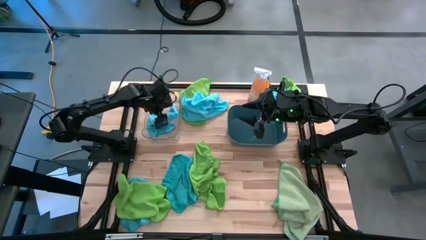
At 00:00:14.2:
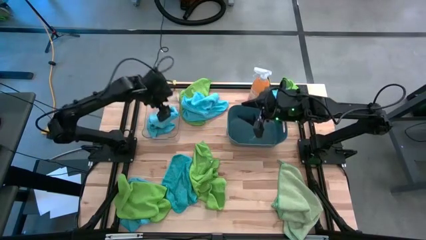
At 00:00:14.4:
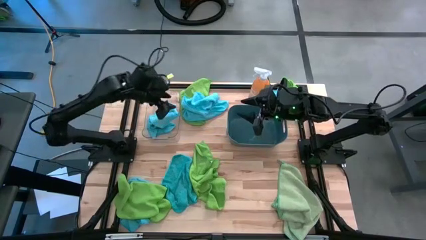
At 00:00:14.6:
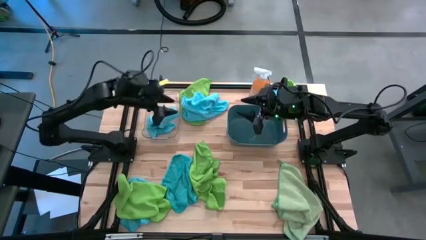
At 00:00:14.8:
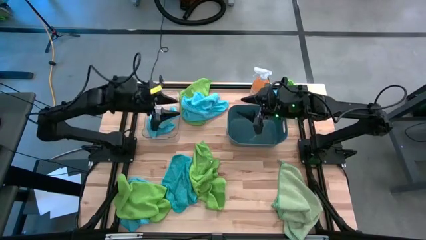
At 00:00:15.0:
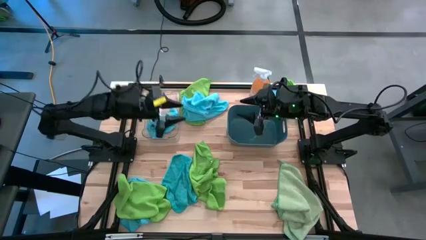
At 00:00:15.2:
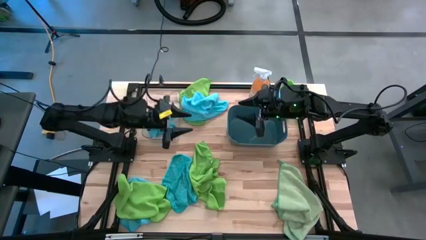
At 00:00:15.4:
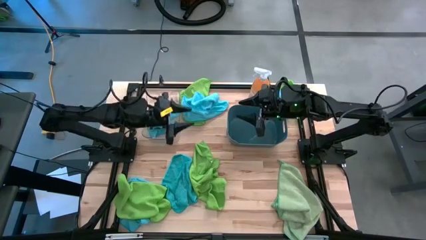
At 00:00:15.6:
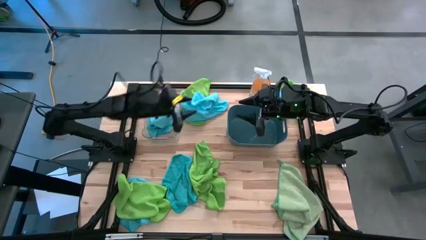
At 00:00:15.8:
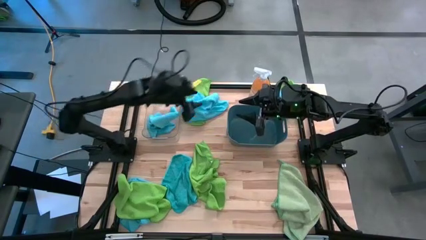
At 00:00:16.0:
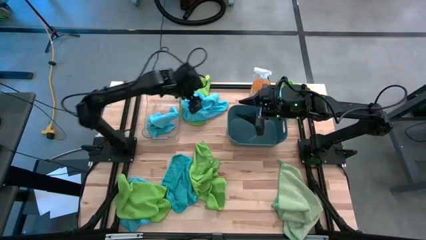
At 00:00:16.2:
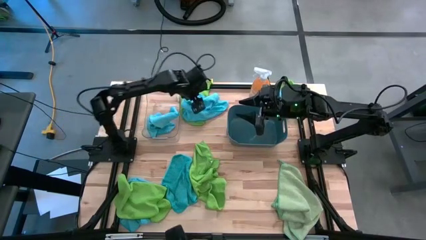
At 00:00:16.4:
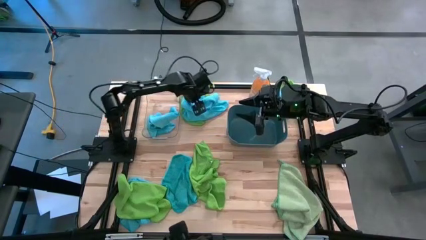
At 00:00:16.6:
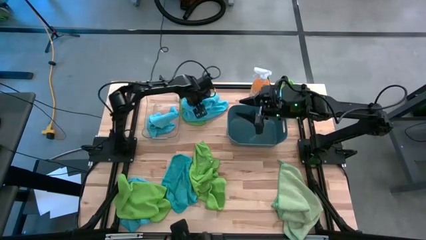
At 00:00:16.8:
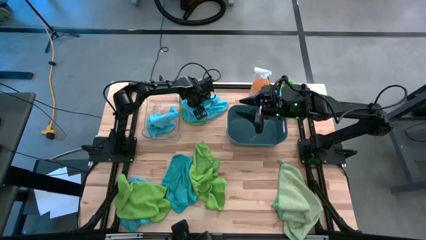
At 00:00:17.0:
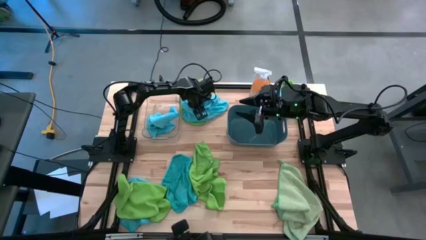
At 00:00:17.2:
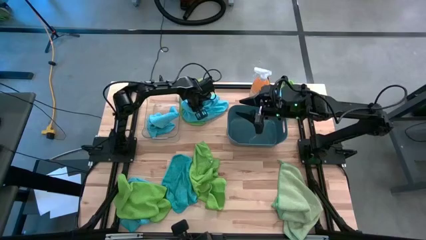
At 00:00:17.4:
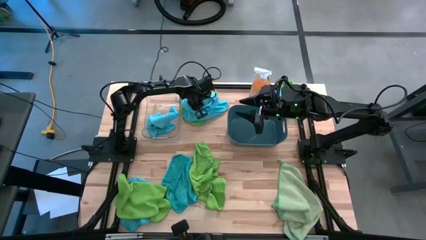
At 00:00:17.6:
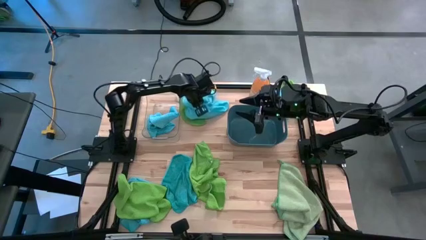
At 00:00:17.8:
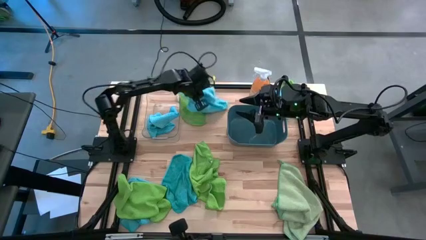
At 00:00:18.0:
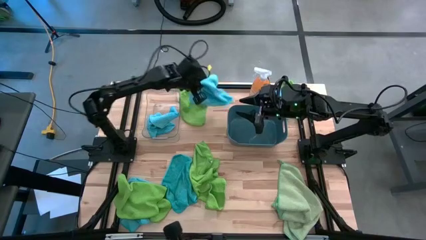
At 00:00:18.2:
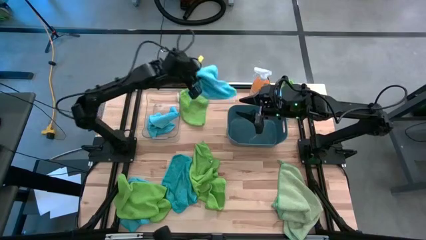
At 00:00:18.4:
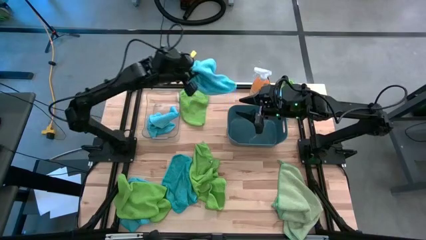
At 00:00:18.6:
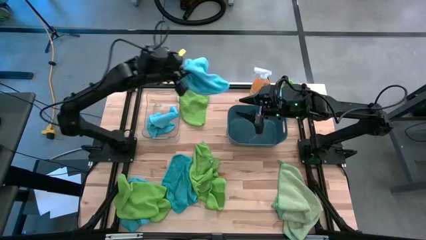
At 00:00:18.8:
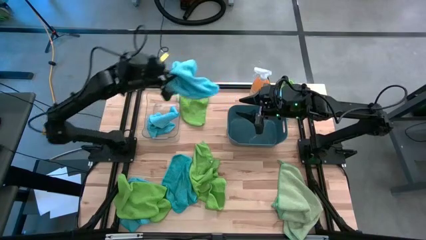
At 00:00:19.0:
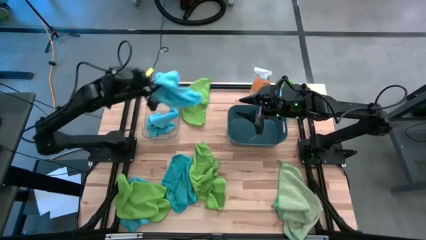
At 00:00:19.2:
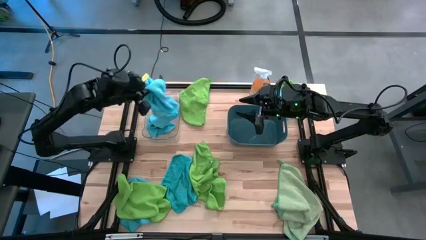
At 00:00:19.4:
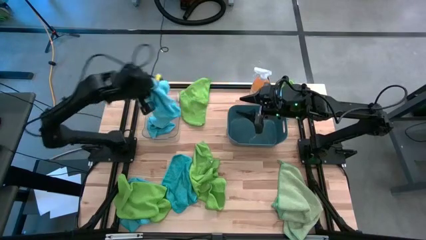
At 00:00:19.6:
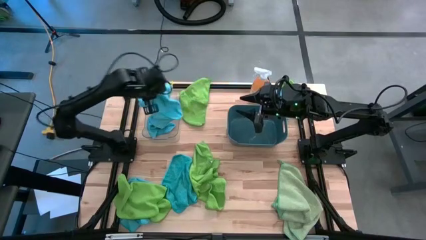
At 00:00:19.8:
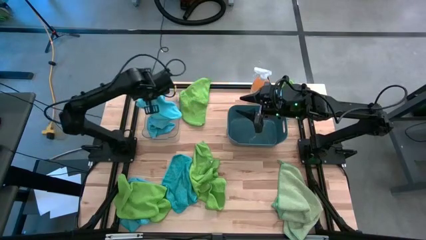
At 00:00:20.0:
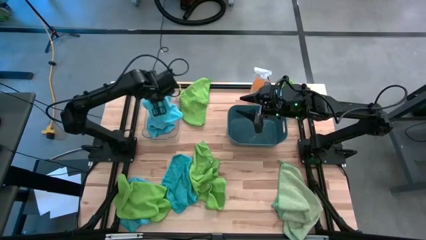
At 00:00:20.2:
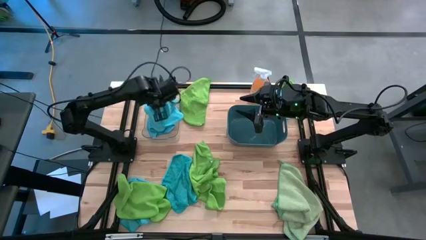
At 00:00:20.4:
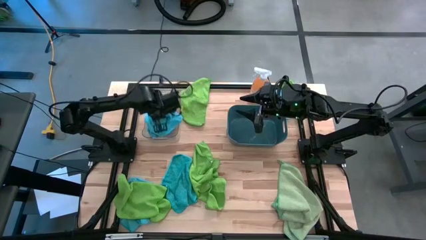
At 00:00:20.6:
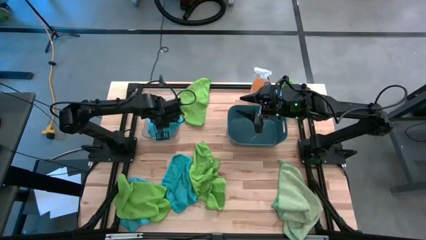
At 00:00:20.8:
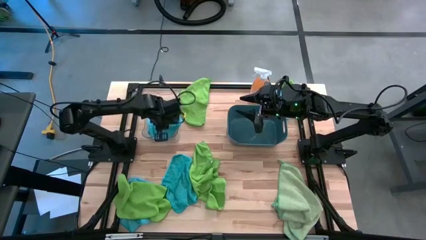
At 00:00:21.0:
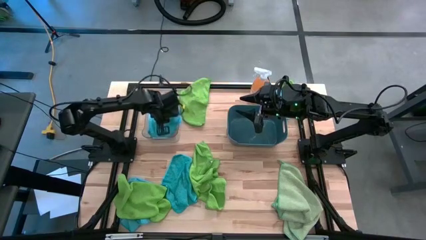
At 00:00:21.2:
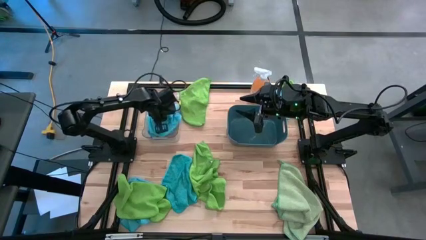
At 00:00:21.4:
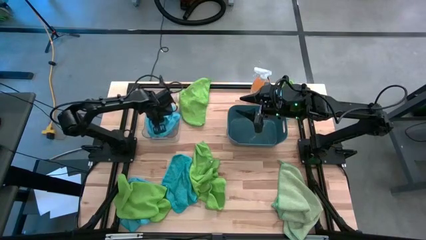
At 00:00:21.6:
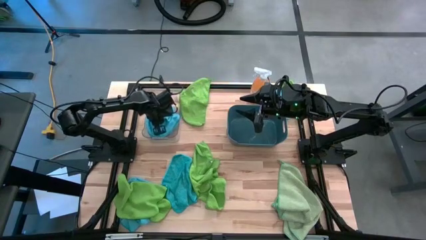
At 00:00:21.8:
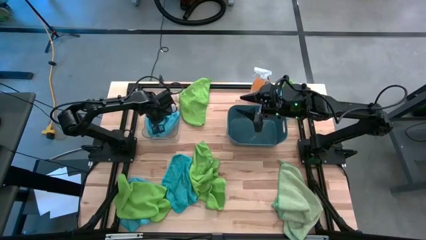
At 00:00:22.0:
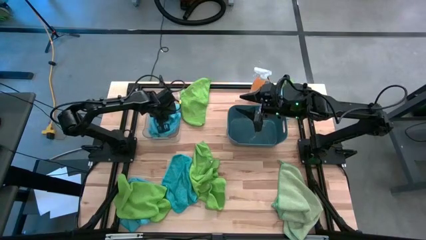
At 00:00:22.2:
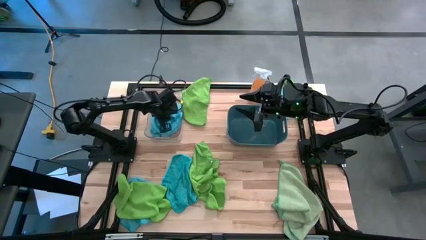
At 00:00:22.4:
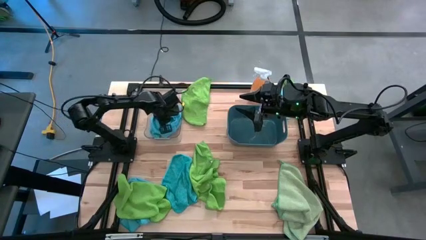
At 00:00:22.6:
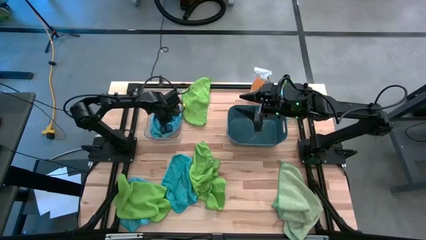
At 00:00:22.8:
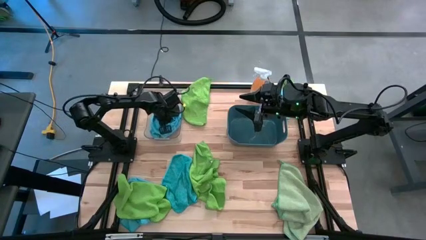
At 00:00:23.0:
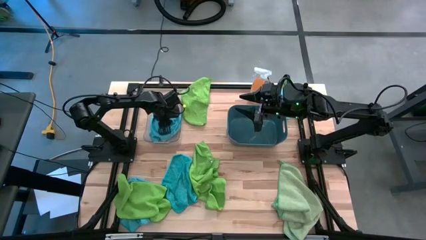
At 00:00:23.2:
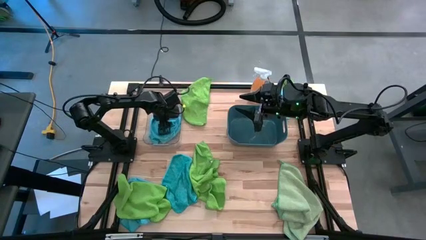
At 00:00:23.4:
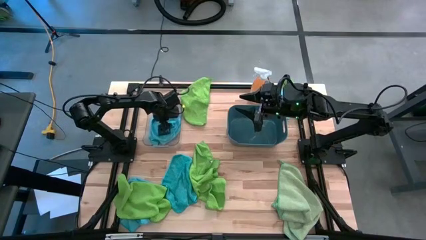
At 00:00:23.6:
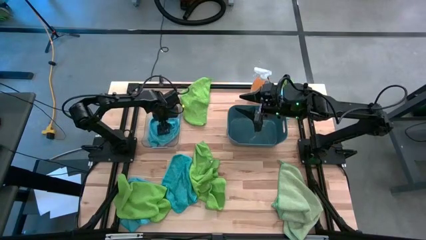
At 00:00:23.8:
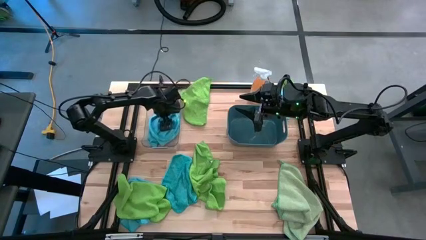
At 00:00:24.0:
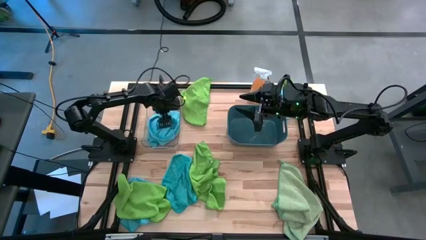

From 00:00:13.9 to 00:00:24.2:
Task: Sort microfiber towel by color & place in baskets
Put the blue microfiber towel into the transparent bin

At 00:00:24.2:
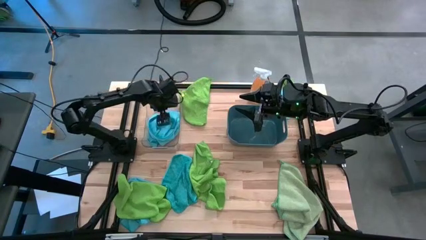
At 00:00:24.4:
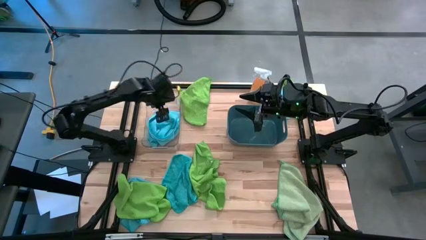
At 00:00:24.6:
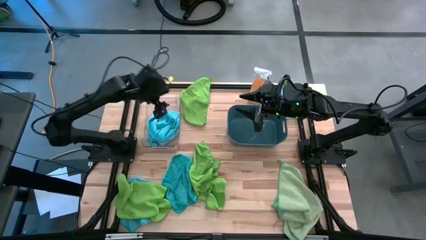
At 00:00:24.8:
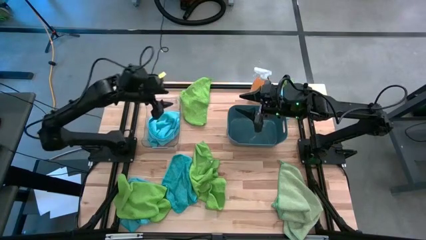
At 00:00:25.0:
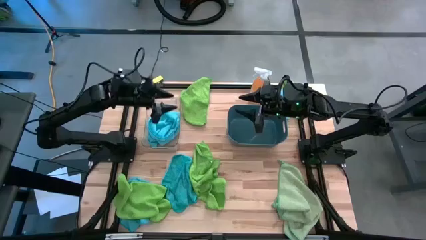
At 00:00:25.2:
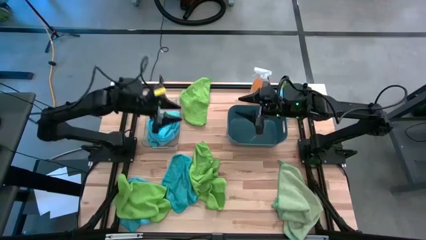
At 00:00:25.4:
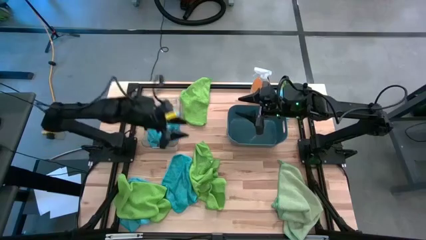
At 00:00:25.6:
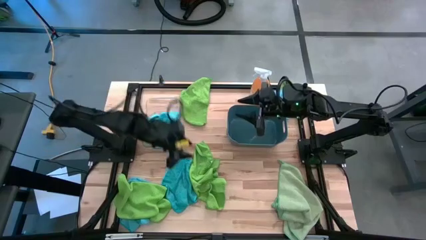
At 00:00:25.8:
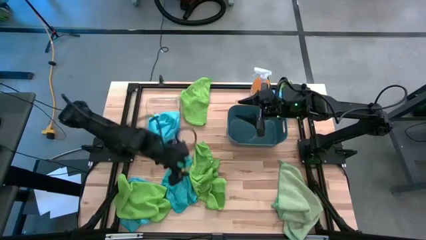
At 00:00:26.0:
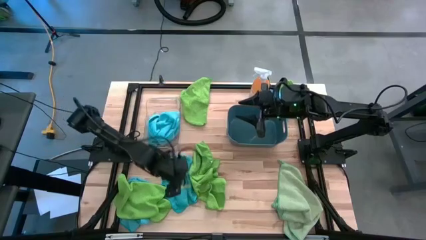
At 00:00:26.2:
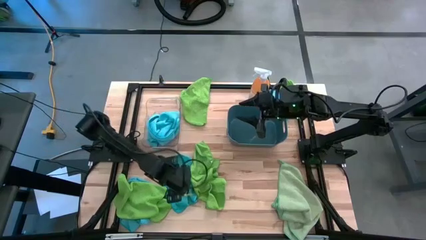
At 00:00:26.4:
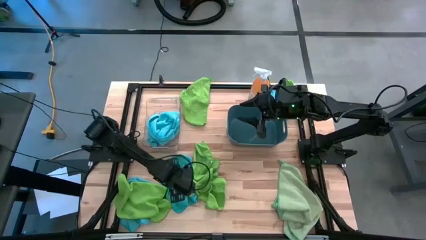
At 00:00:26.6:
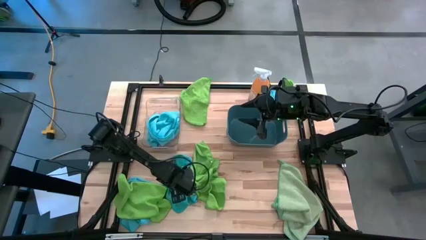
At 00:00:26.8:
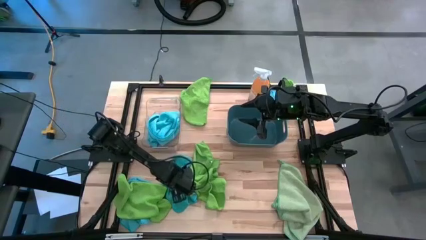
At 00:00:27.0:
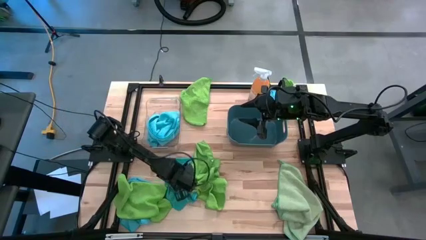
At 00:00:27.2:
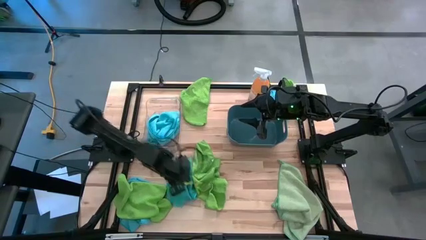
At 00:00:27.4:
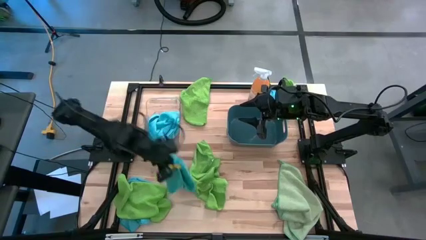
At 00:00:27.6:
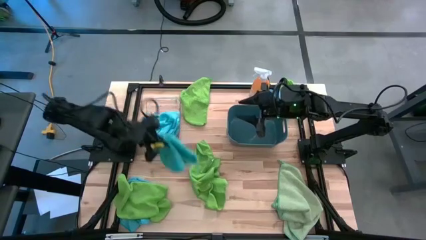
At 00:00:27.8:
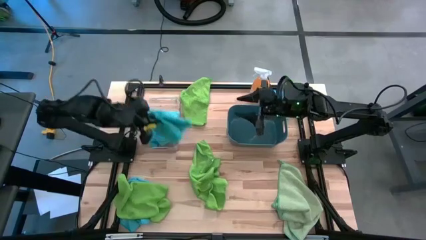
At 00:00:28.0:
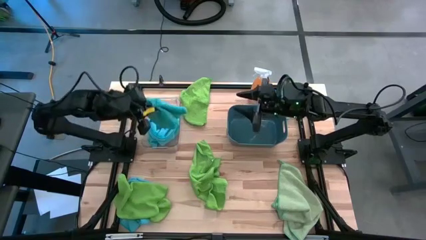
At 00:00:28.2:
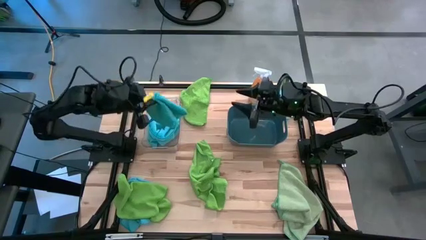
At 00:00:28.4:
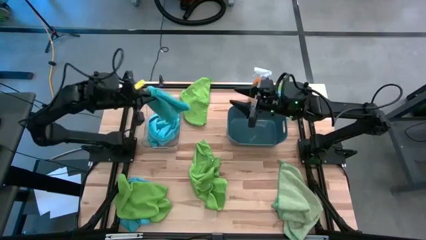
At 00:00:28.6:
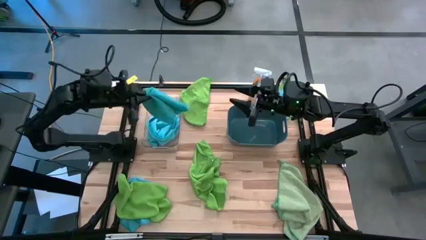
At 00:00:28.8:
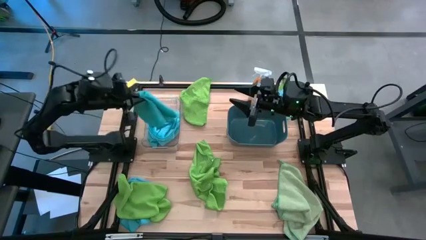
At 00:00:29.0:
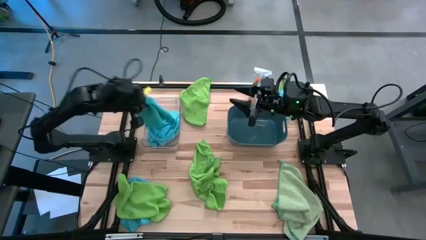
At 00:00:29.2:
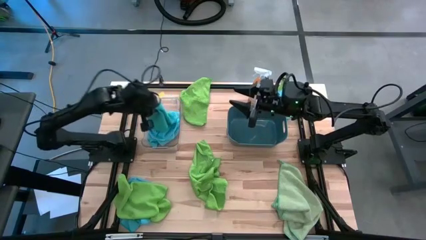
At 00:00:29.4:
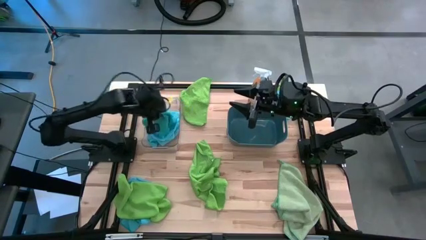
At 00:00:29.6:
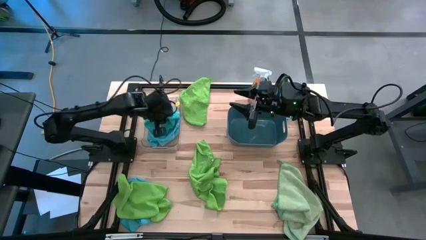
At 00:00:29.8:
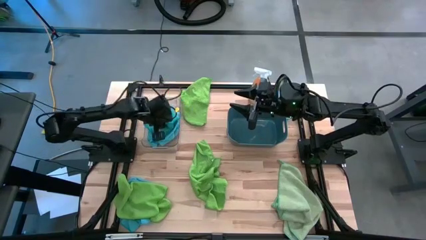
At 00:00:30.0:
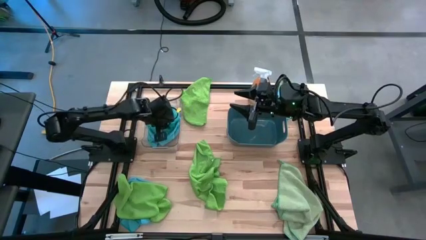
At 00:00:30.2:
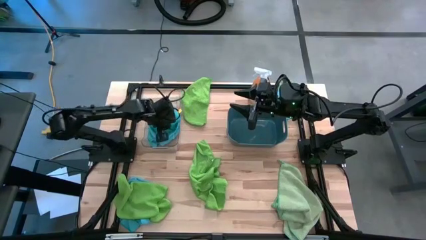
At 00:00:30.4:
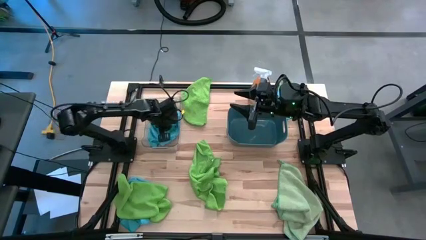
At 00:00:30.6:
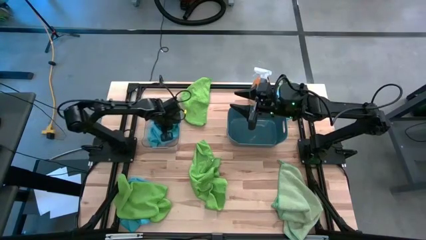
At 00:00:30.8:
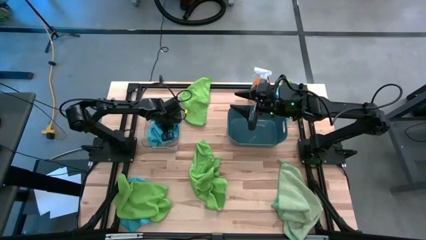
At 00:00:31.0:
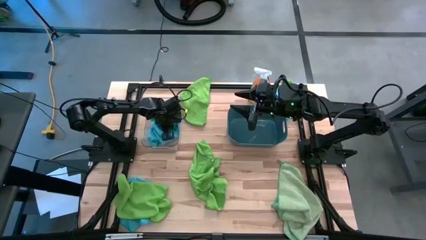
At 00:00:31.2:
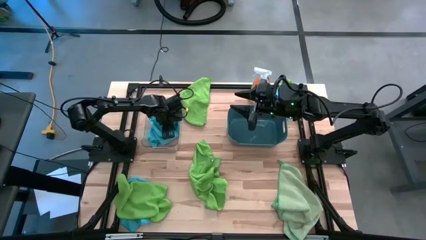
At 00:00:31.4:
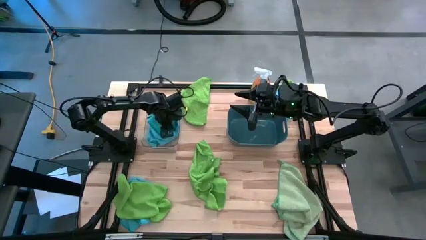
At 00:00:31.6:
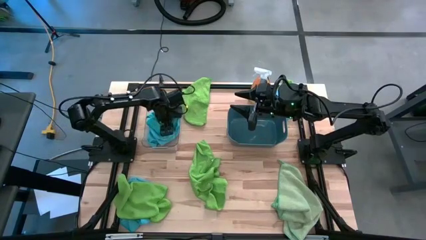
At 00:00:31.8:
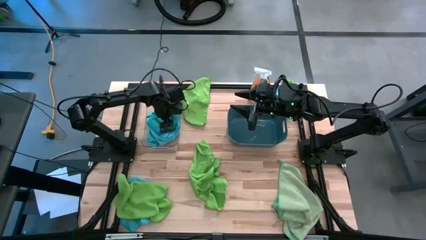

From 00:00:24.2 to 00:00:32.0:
Put the blue microfiber towel into the transparent bin
